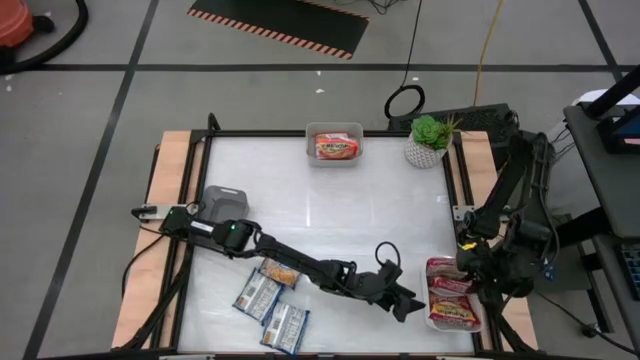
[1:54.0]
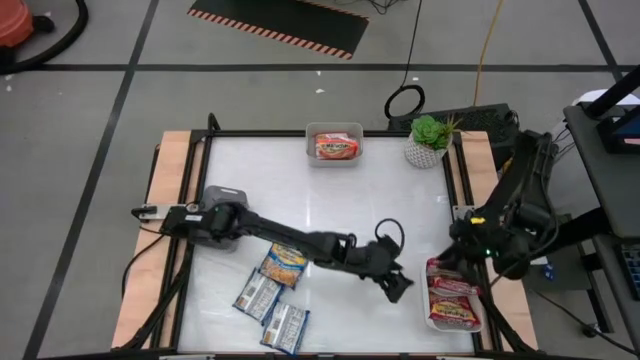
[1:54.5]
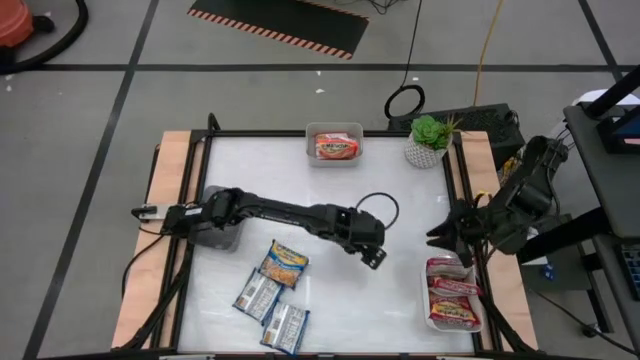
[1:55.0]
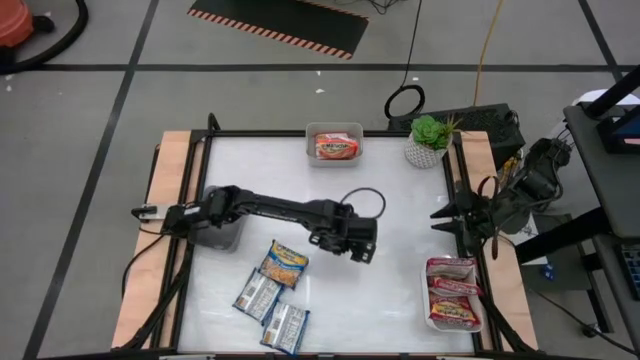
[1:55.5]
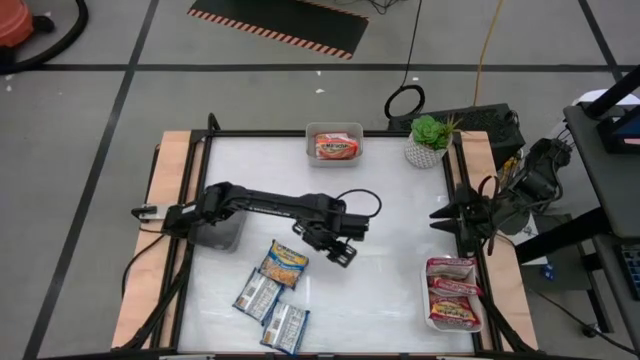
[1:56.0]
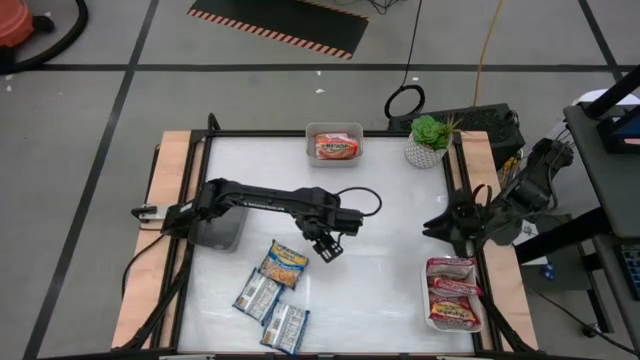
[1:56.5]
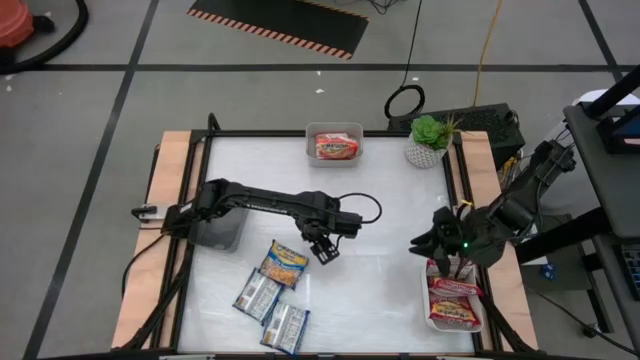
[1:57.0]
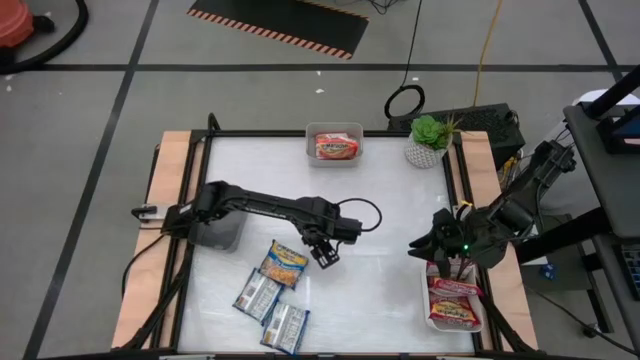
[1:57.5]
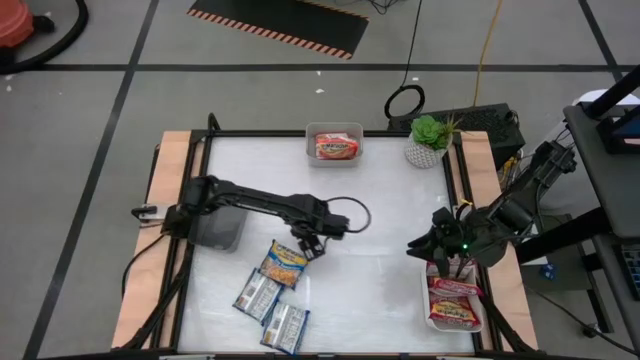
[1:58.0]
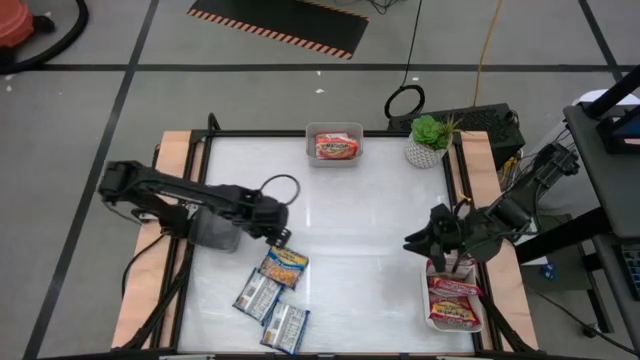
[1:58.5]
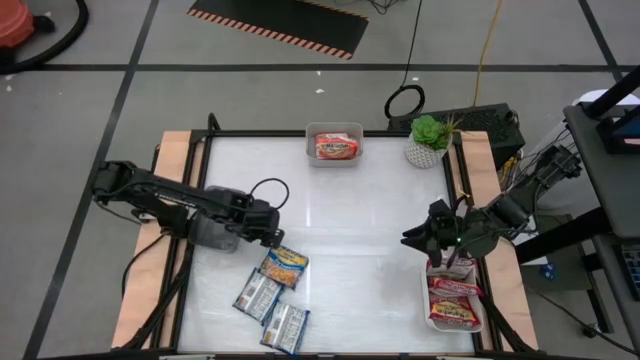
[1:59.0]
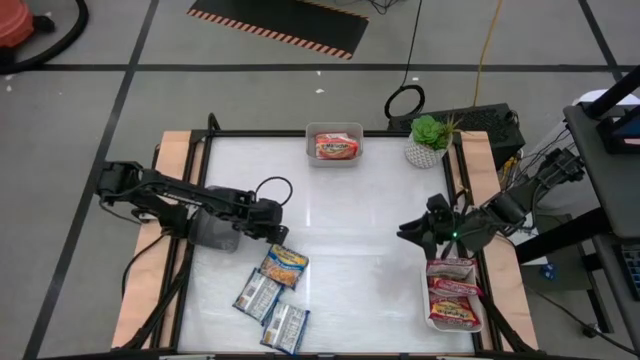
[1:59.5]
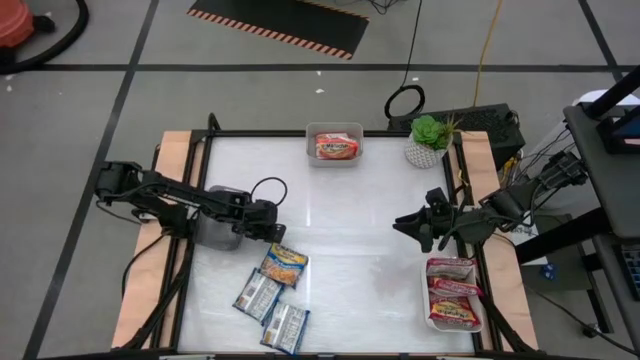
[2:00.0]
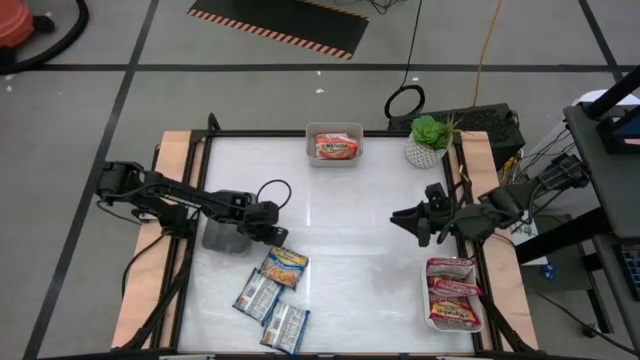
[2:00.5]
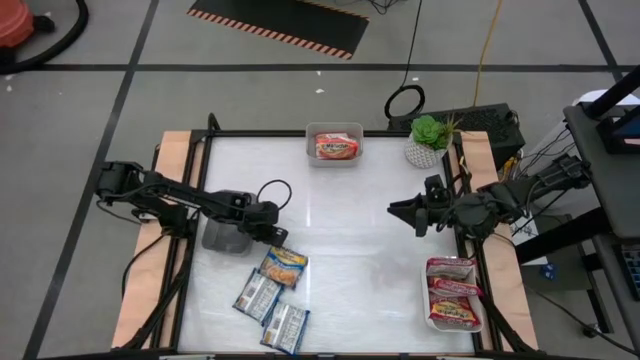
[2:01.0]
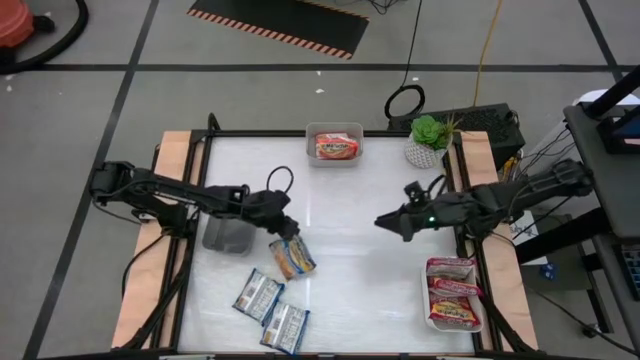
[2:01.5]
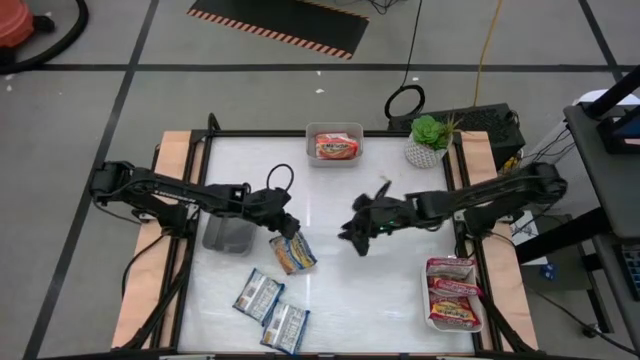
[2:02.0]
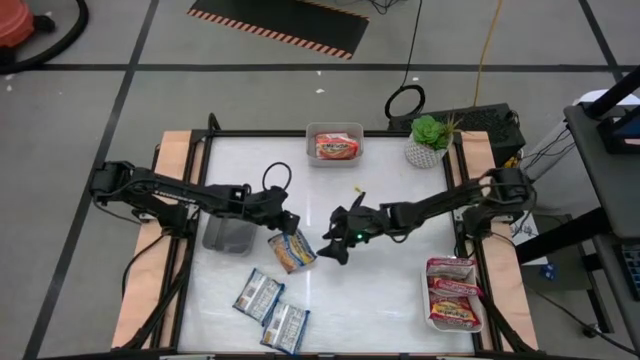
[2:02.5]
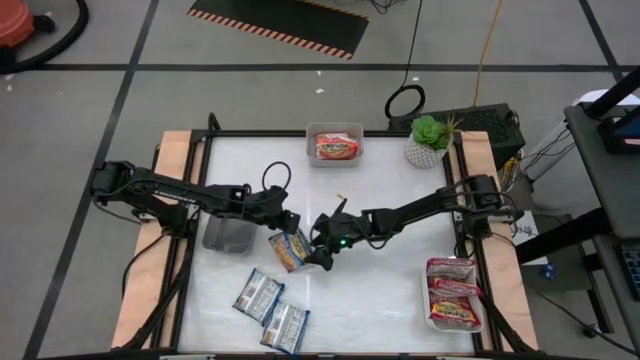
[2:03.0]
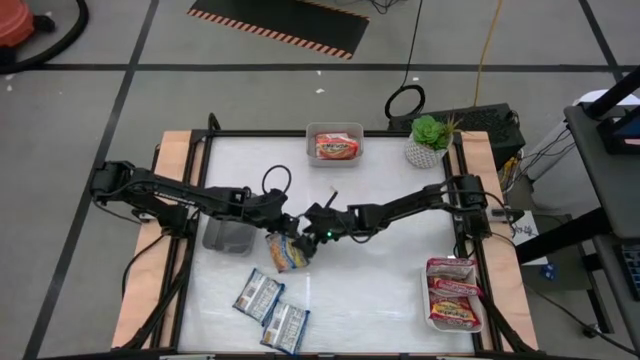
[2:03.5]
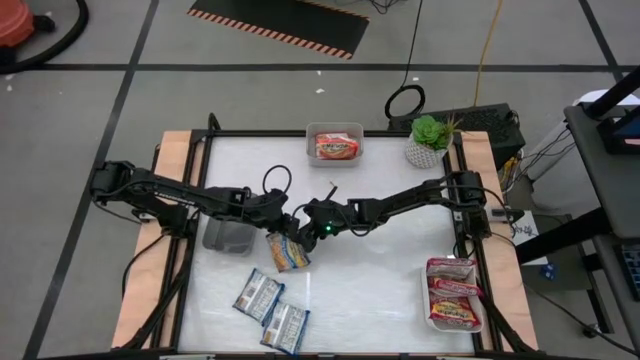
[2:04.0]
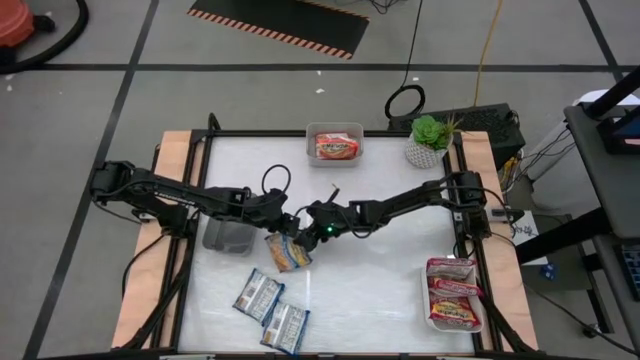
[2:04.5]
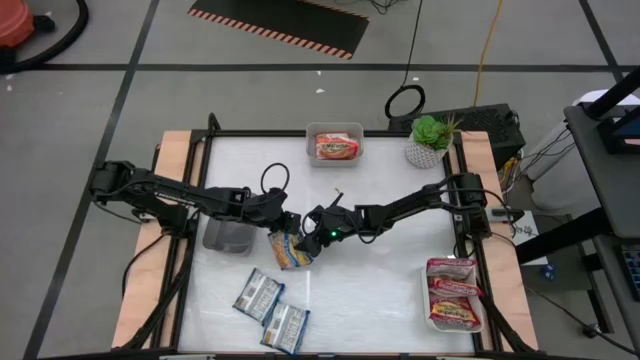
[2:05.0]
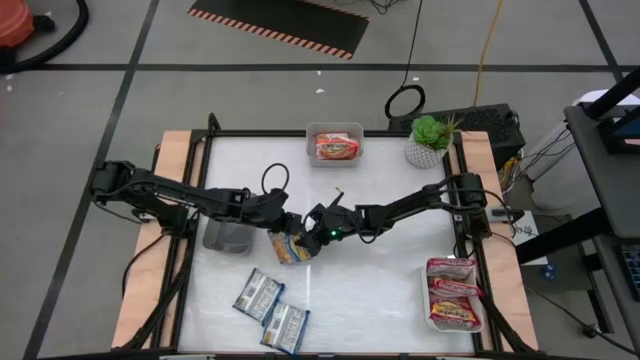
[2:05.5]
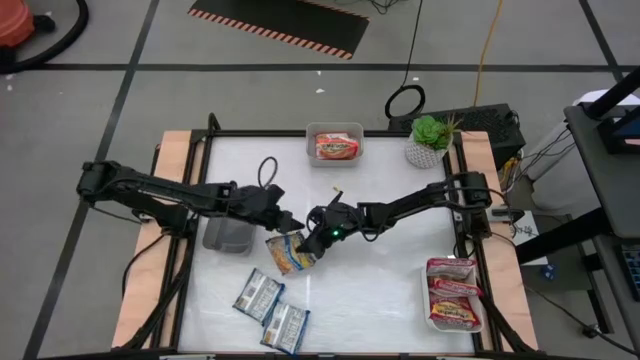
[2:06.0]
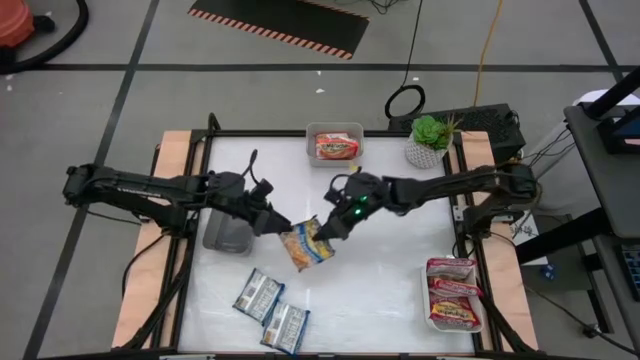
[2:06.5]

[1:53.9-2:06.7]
Task: Sort Maruchan noodles
Put the top blue noodle pack into the black bin

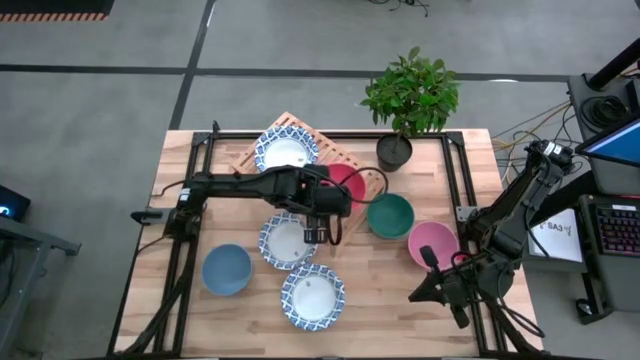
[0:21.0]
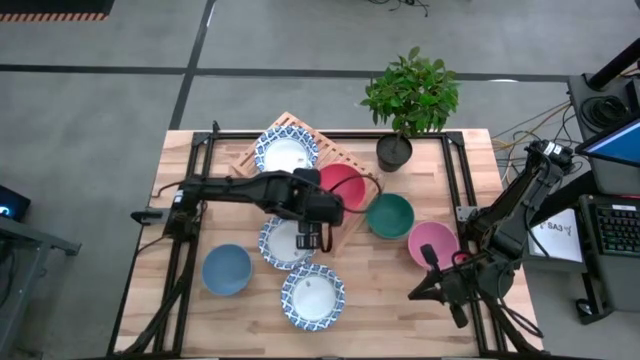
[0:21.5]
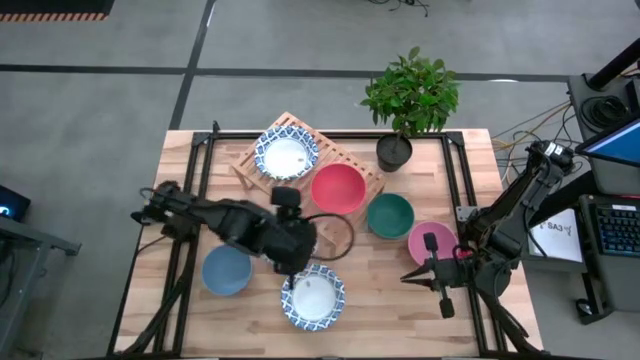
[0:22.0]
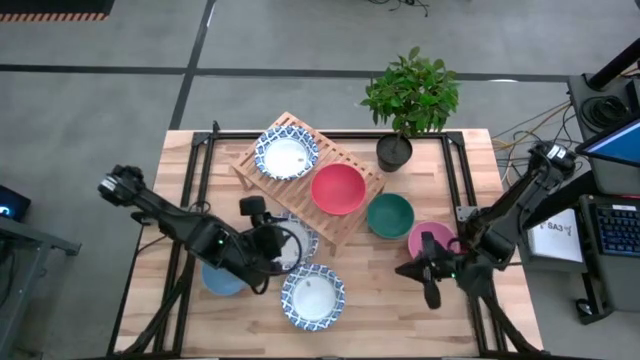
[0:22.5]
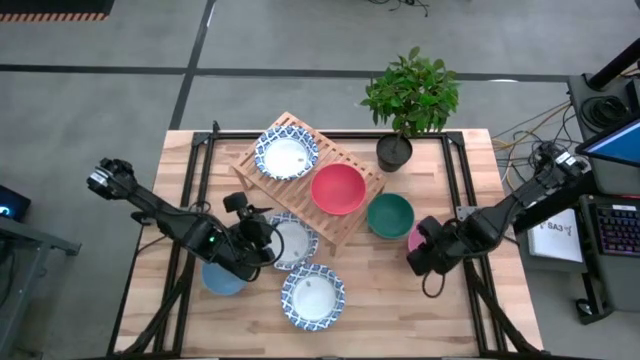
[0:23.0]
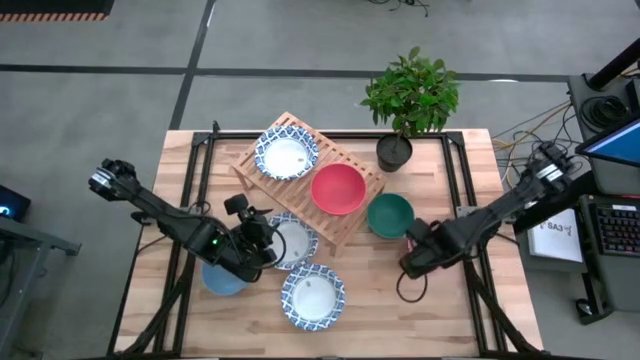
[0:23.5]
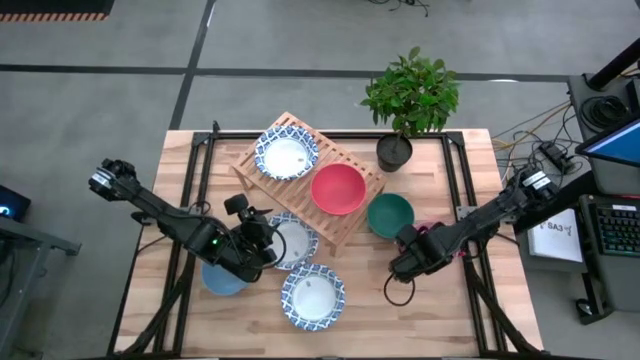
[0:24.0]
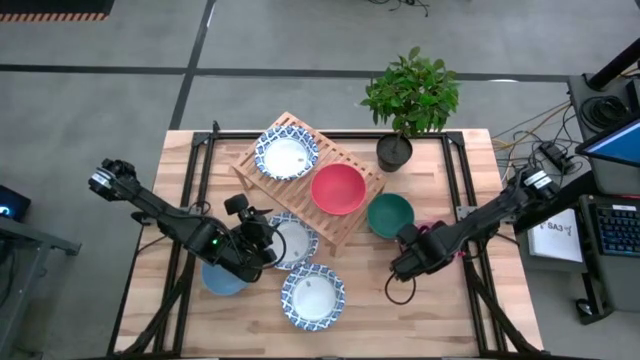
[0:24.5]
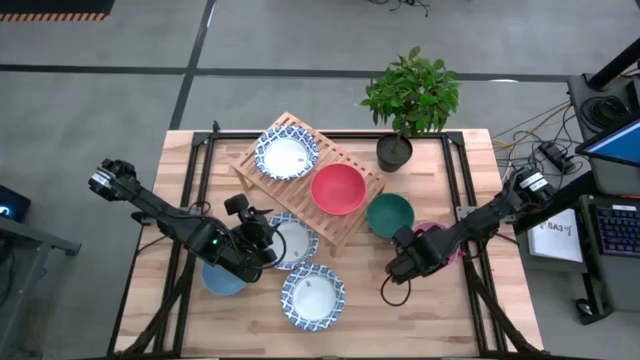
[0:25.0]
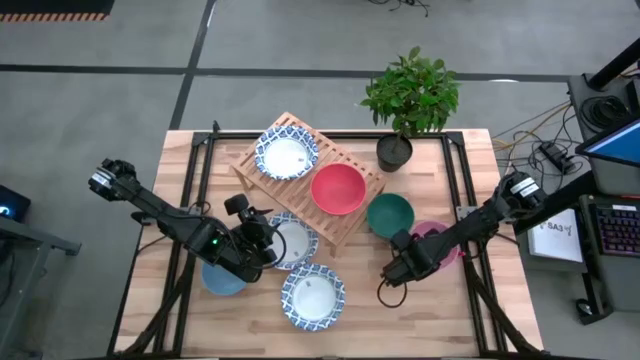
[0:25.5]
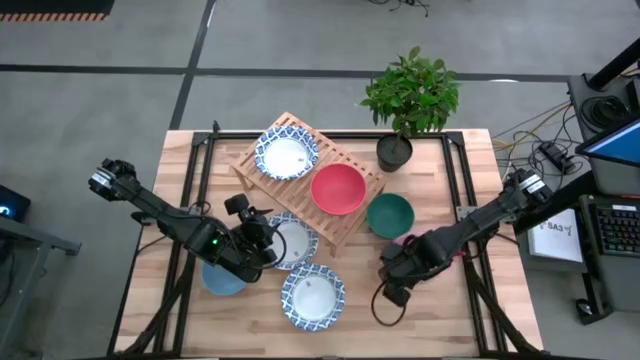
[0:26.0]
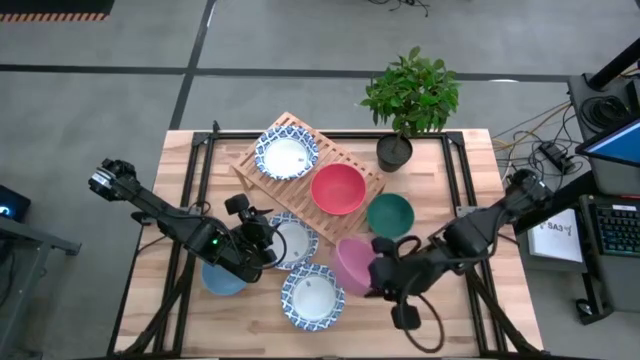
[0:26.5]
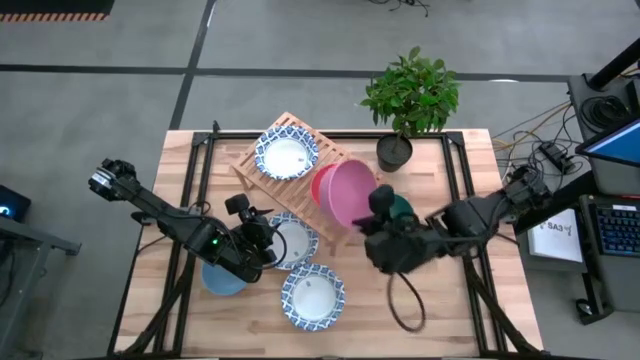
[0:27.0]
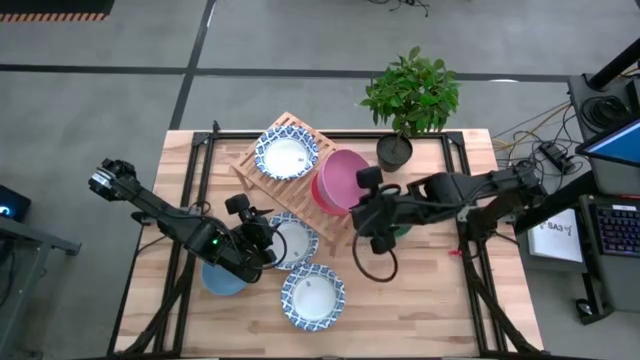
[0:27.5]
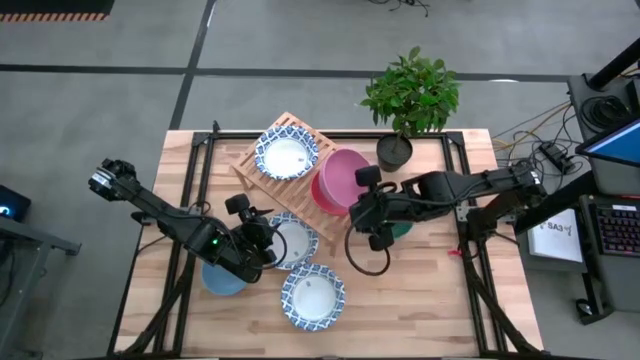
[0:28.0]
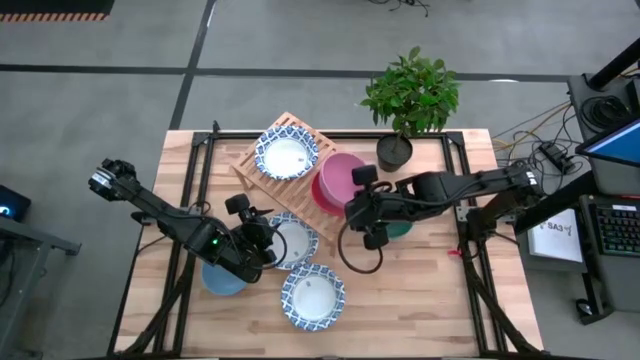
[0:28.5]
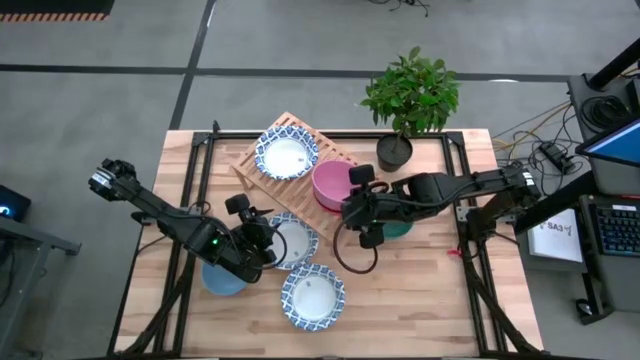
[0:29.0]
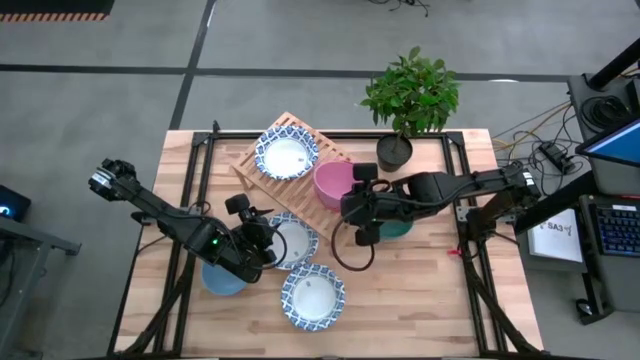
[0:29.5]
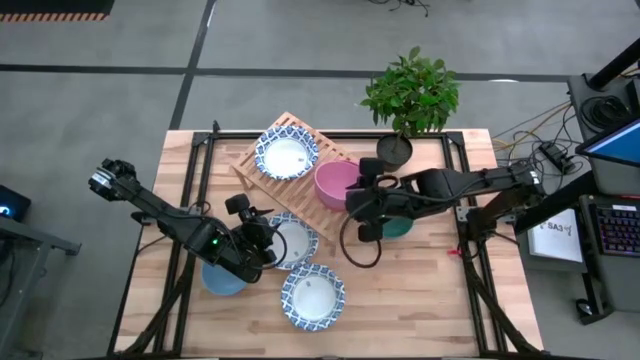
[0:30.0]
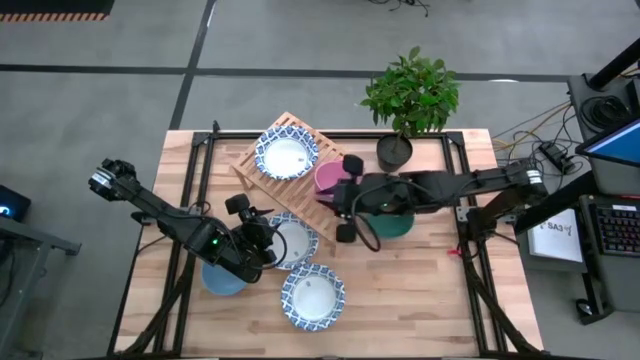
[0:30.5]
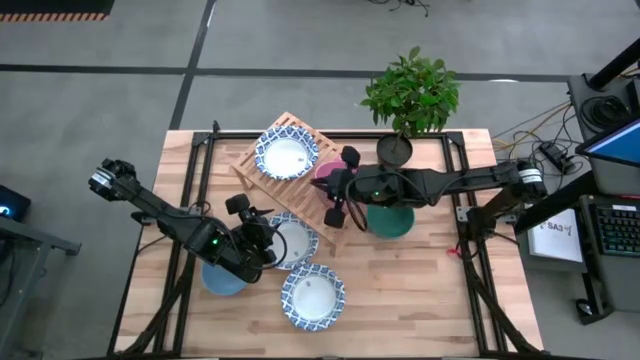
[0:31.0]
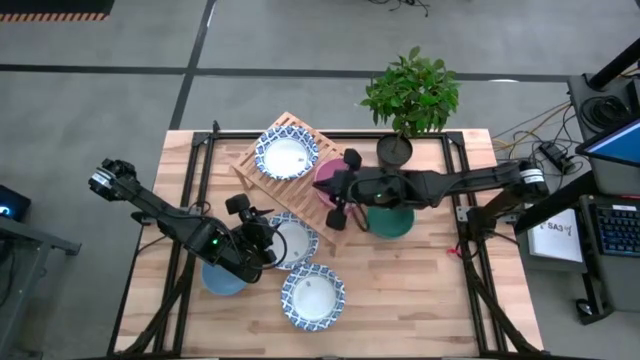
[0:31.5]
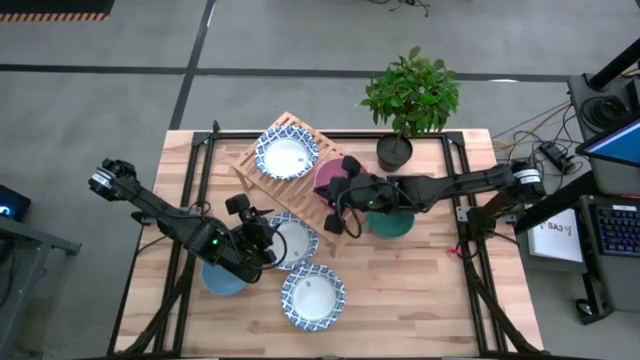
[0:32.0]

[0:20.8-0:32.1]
Task: Place and stack bowls onto a shelf
Stack the pink bowl on top of the red bowl on the shelf
